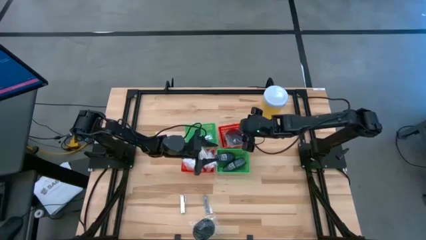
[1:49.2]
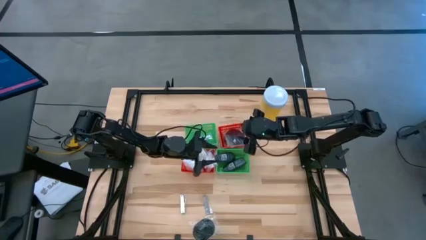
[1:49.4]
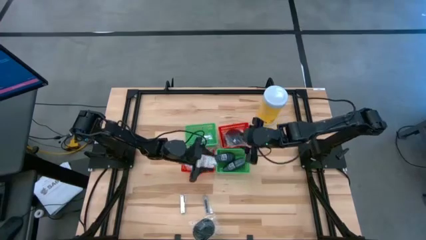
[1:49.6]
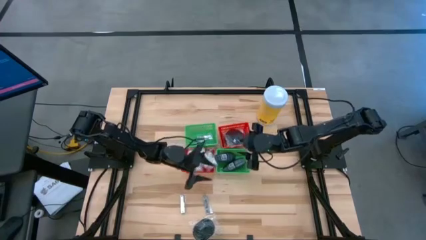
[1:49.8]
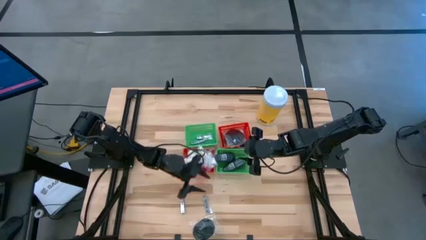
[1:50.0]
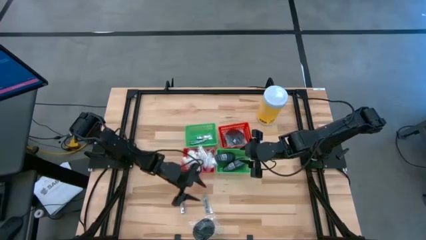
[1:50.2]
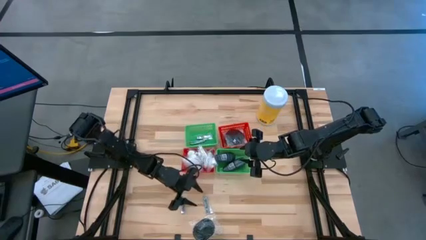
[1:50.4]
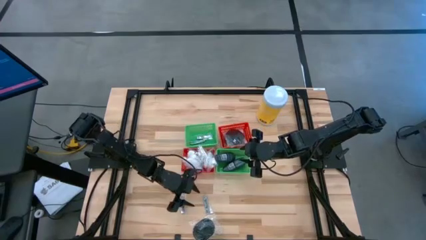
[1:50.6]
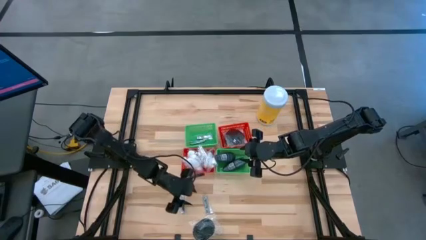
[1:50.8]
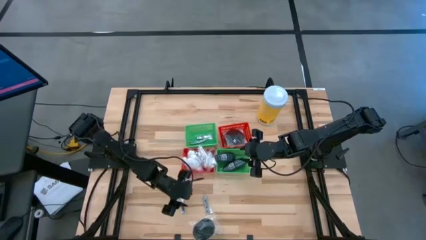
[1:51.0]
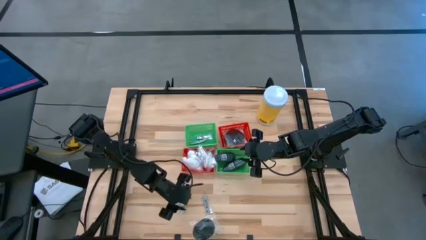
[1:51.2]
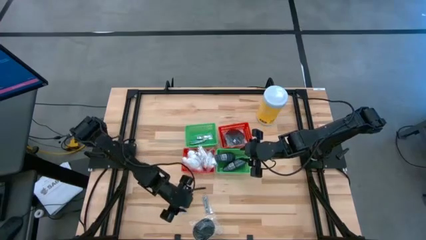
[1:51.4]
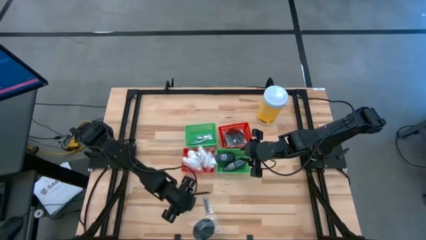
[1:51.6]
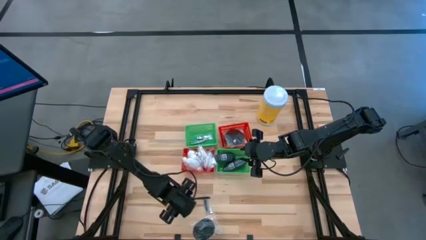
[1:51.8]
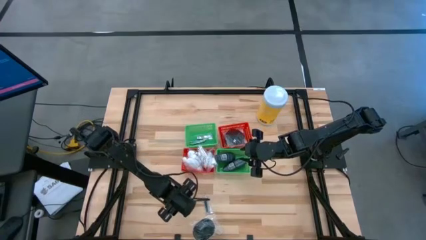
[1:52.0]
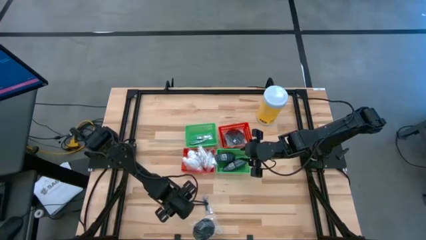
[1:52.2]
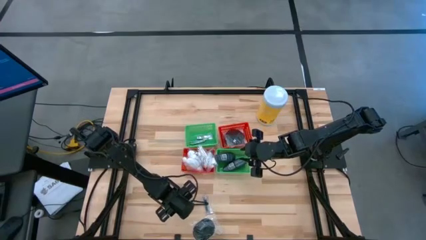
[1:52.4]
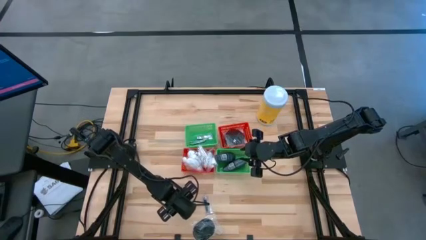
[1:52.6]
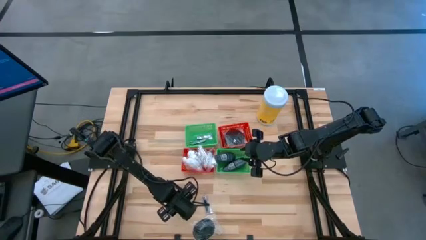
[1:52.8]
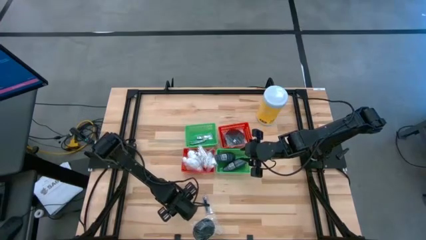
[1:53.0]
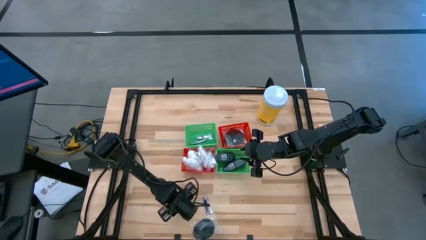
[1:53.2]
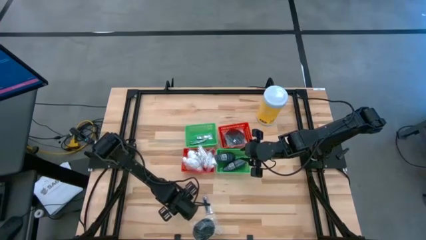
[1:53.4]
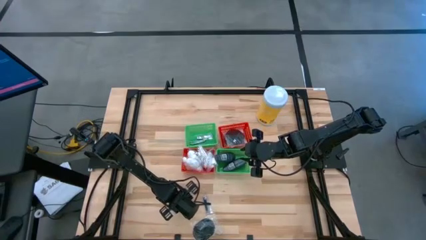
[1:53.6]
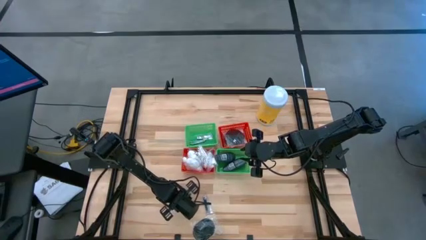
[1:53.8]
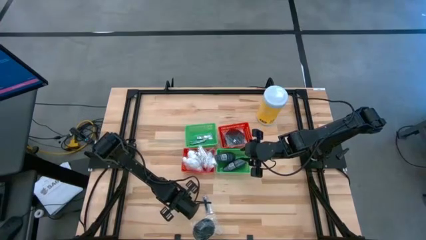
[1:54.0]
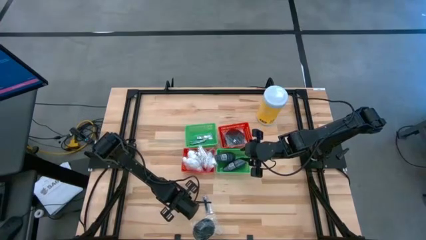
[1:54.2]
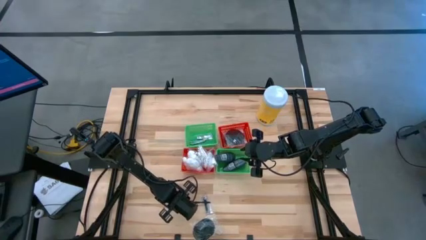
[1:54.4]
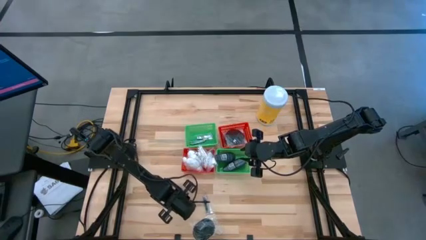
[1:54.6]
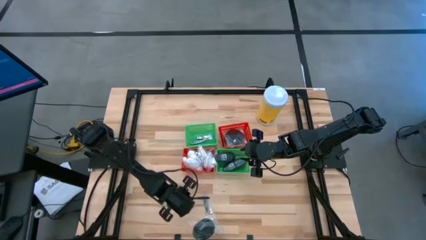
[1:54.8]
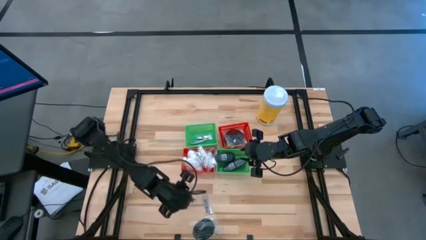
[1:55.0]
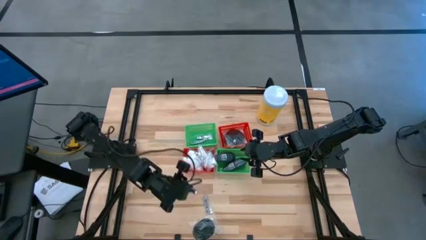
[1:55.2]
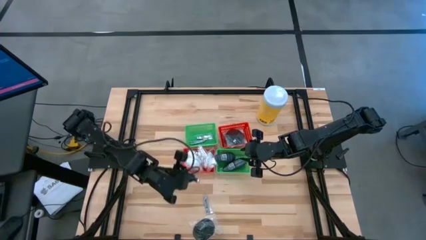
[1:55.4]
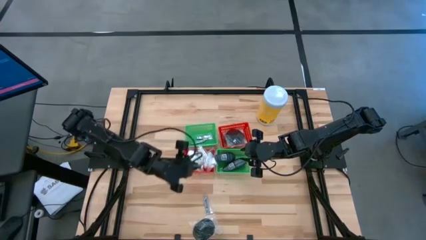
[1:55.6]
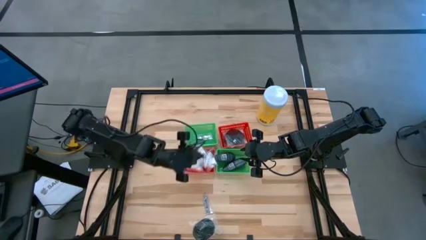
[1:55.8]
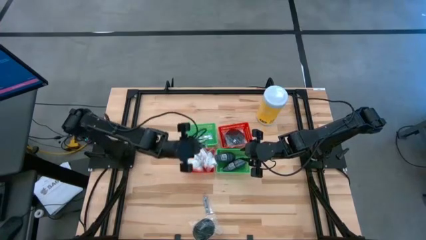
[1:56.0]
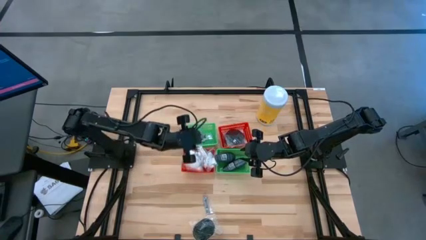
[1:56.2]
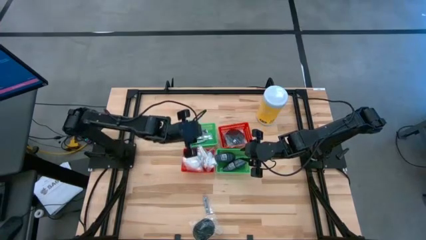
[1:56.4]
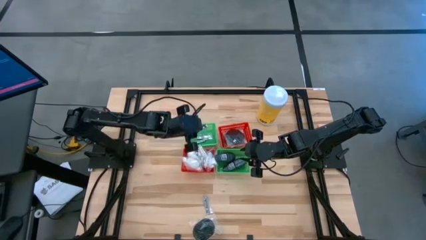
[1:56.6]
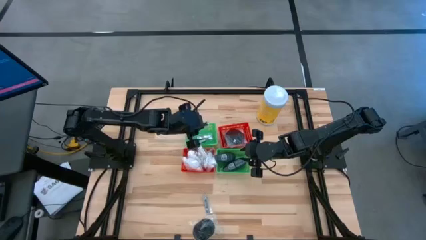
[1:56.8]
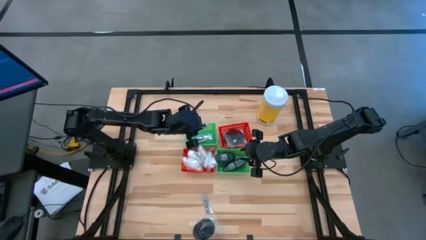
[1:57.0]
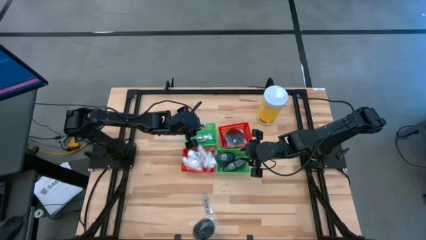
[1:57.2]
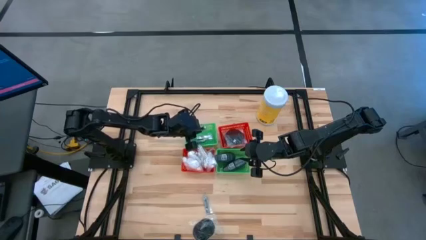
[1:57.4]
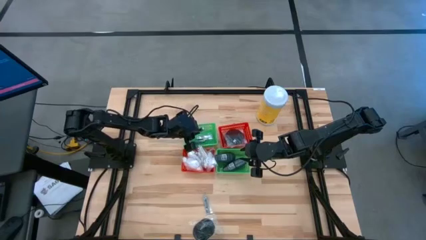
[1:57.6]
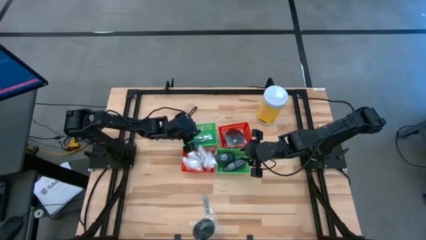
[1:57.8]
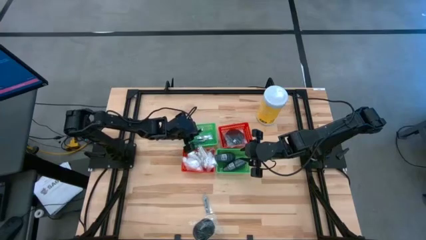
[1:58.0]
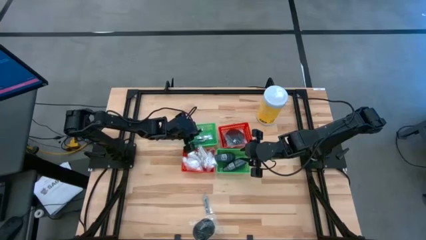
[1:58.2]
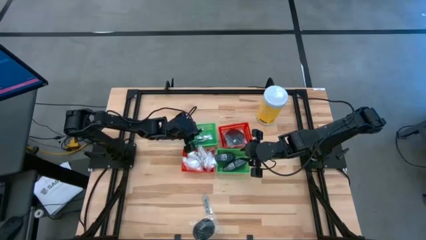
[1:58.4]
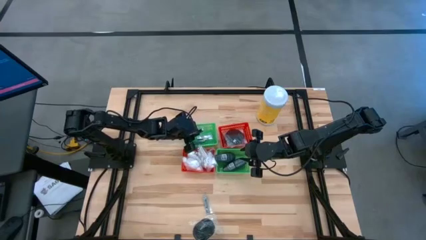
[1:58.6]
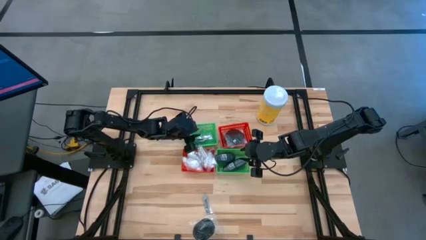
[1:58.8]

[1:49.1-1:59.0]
Task: Pick & Place Travel size toiletries
Put the silver nail cutter into the left green basket

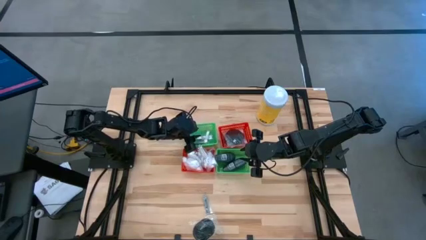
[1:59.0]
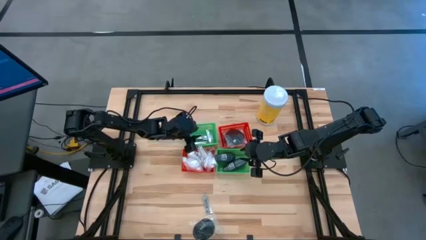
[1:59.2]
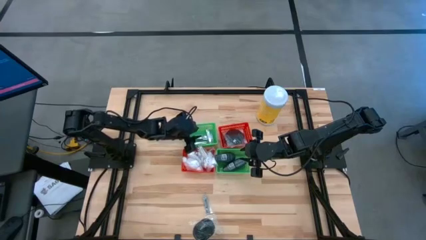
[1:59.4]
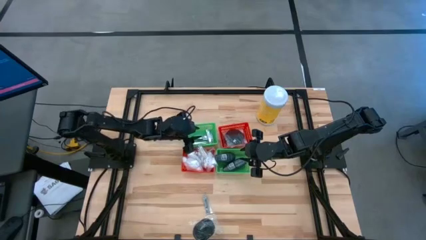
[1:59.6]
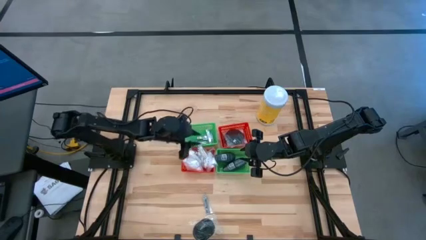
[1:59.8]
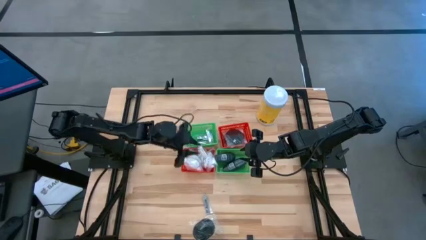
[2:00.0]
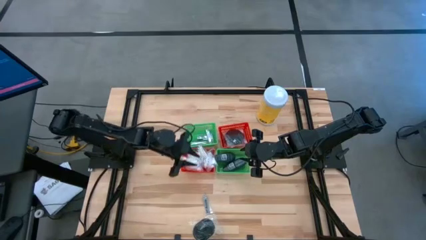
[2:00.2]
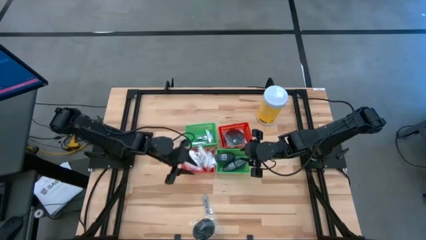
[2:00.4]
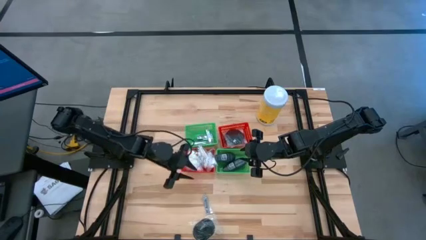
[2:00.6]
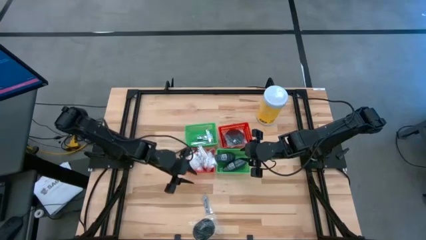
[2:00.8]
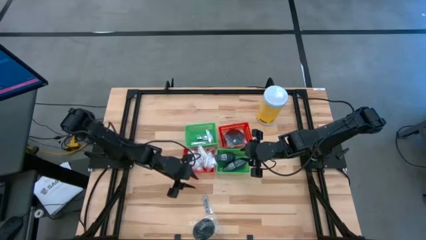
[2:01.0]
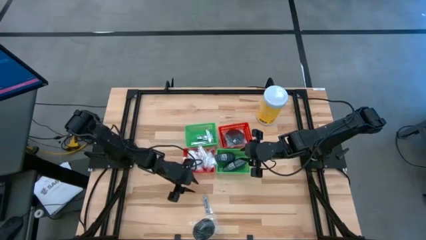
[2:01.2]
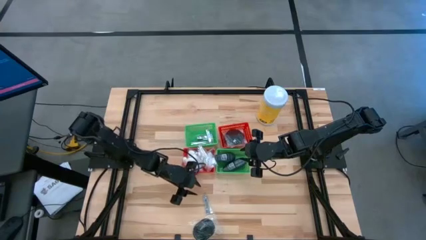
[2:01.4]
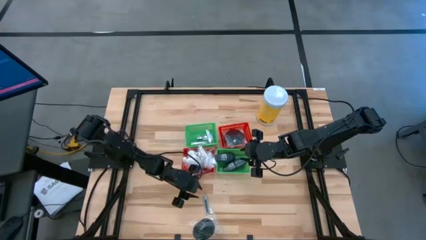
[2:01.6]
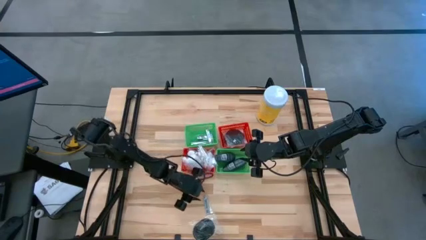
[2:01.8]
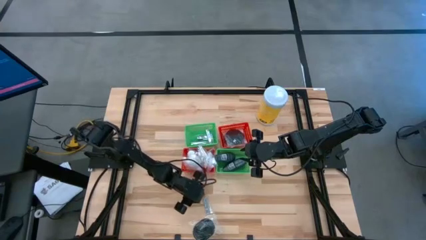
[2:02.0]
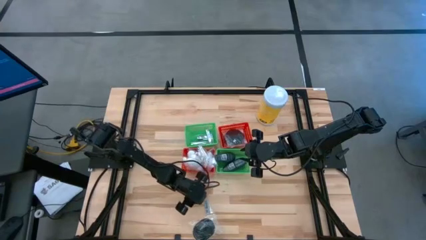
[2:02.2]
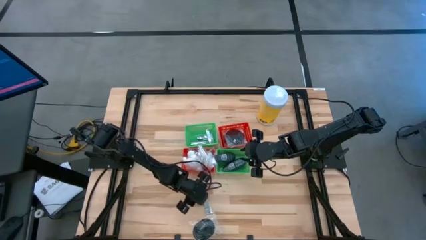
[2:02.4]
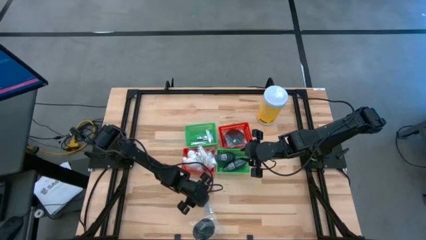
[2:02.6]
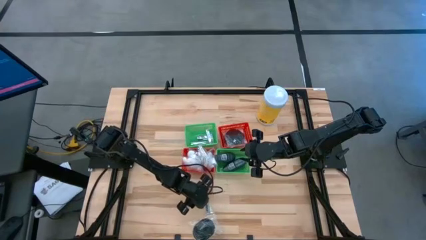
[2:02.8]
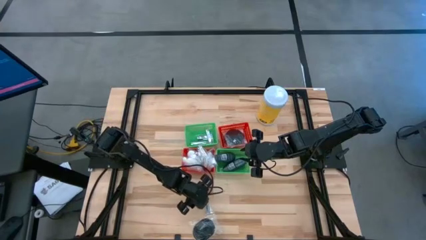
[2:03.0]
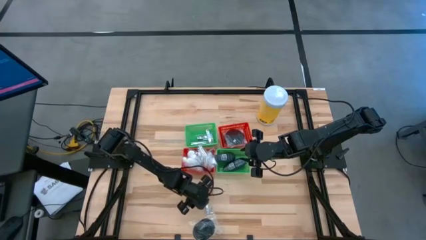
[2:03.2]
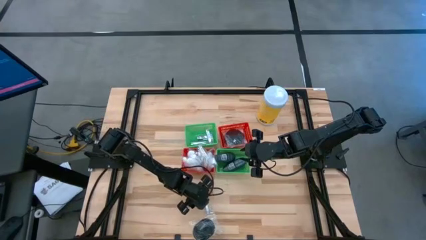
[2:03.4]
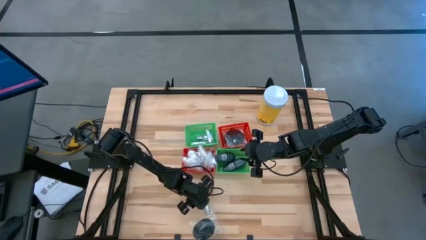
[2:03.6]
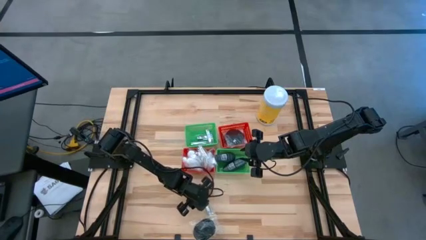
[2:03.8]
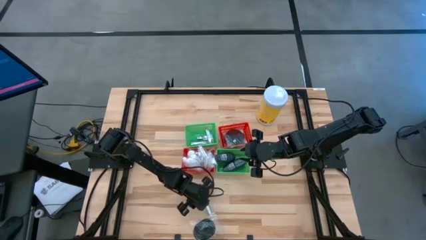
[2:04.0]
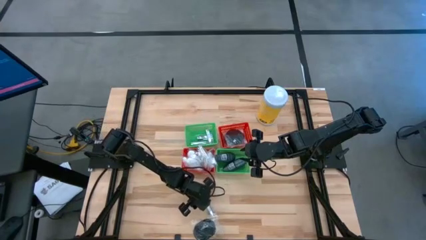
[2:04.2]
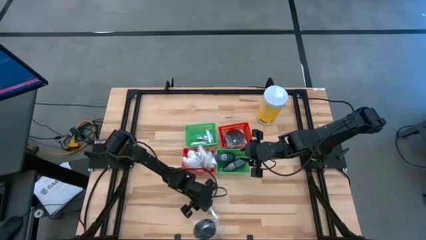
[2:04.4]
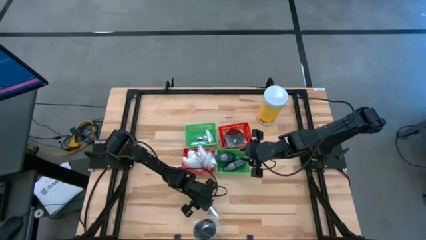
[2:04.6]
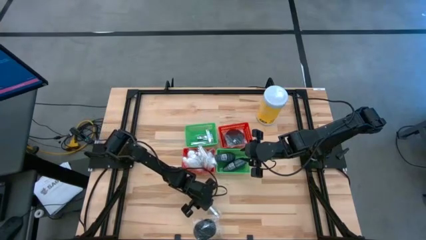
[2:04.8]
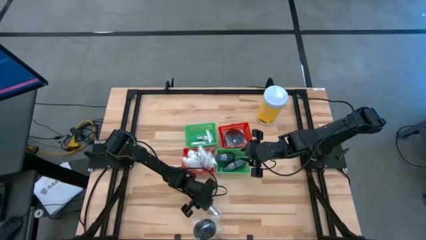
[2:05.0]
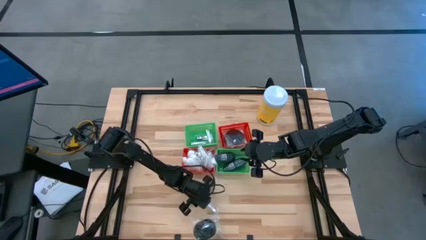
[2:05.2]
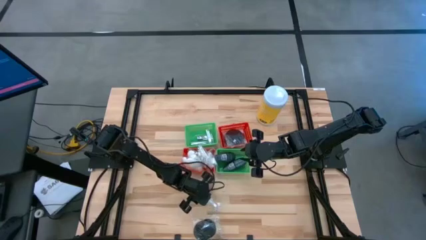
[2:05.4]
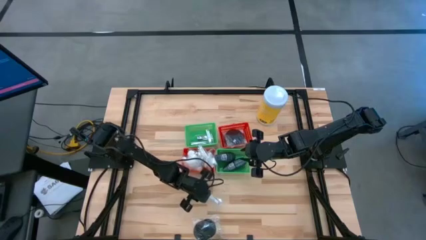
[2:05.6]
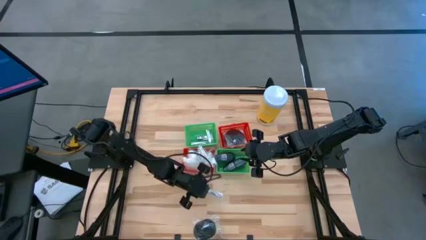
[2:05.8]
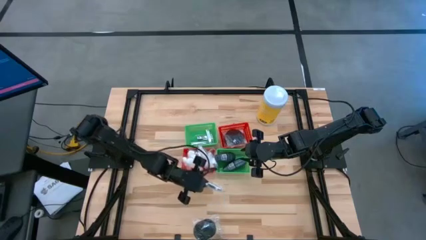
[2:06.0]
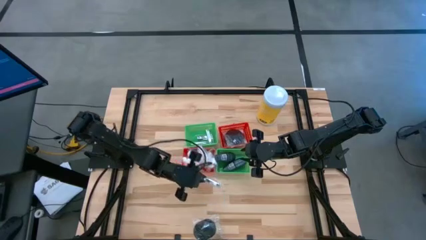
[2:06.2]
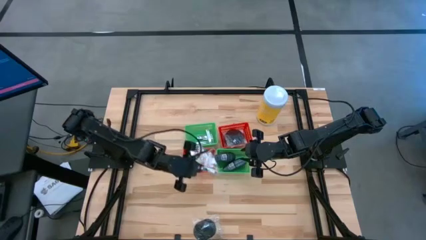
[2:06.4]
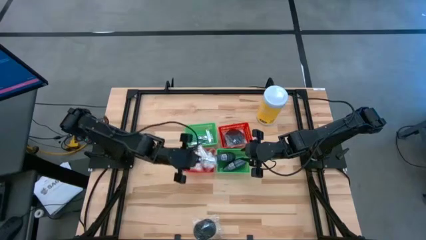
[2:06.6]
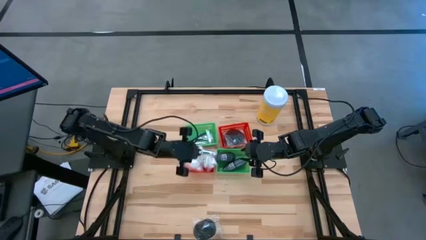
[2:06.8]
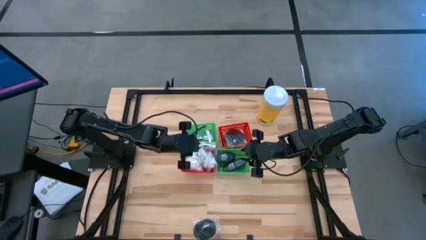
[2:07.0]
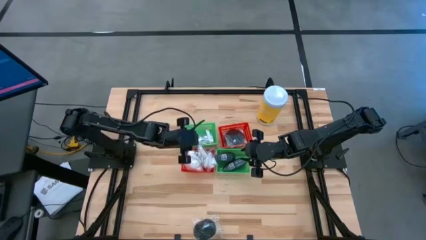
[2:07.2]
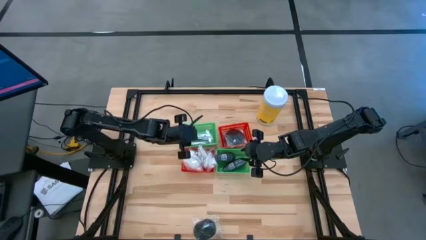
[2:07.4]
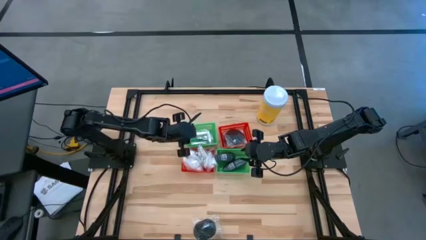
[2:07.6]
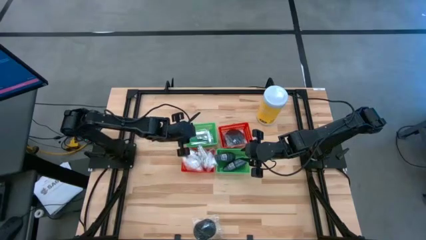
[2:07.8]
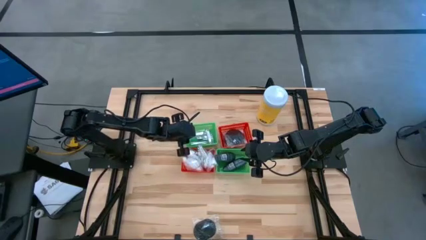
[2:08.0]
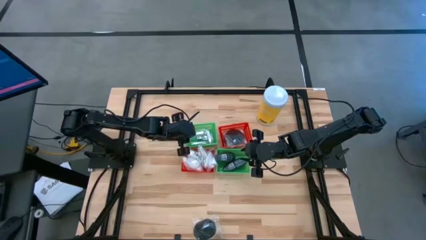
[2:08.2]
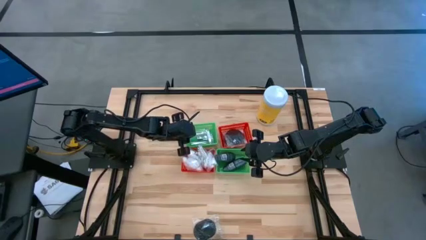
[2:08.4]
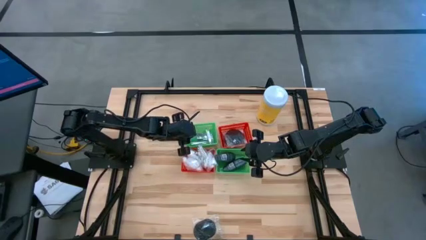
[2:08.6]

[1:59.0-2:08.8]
Put the silver nail cutter into the left green basket
